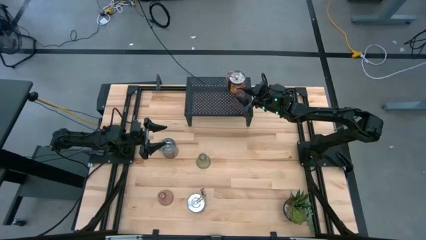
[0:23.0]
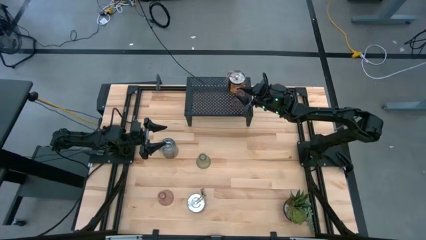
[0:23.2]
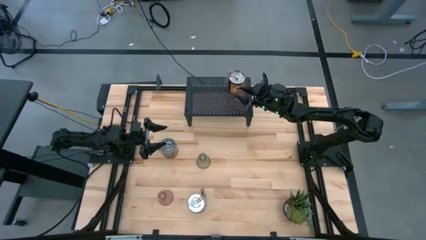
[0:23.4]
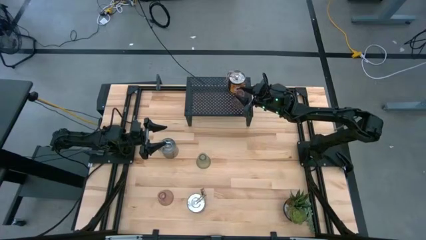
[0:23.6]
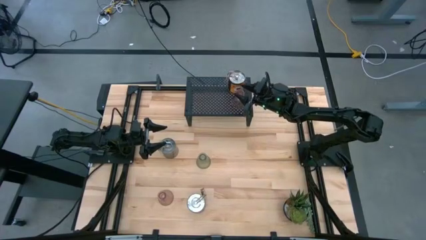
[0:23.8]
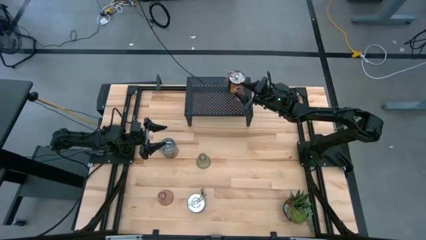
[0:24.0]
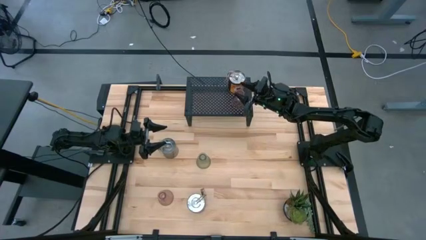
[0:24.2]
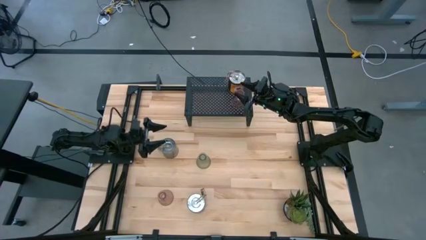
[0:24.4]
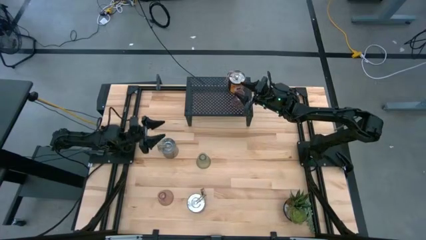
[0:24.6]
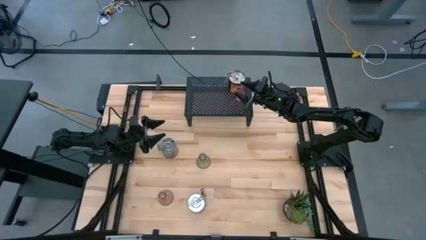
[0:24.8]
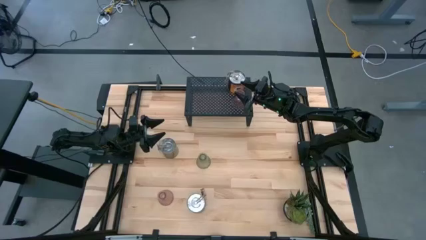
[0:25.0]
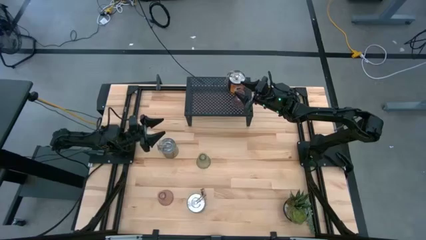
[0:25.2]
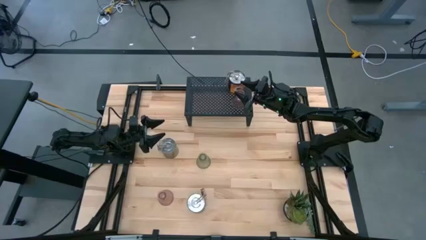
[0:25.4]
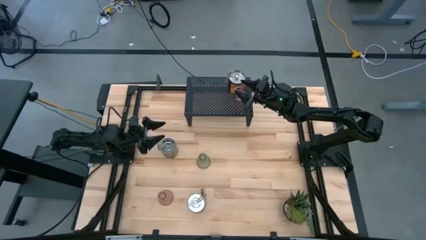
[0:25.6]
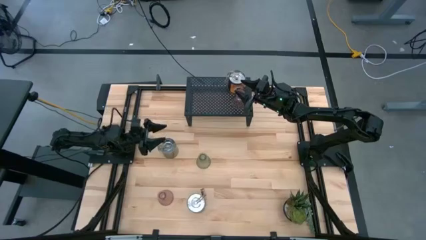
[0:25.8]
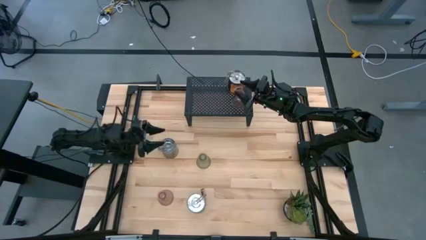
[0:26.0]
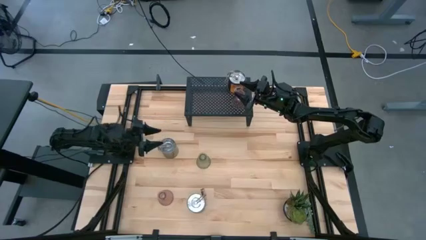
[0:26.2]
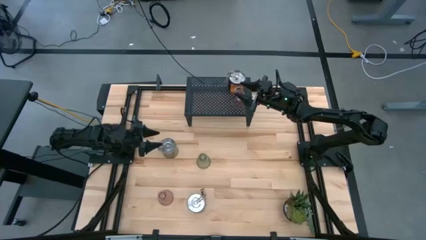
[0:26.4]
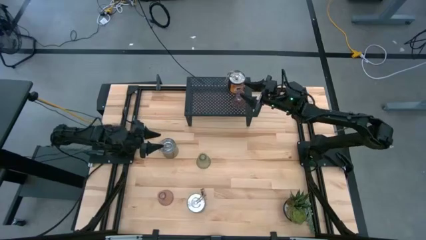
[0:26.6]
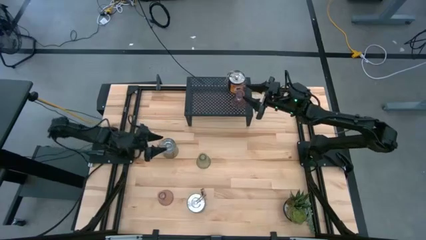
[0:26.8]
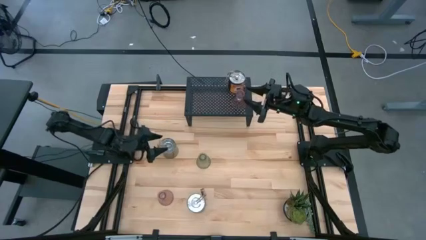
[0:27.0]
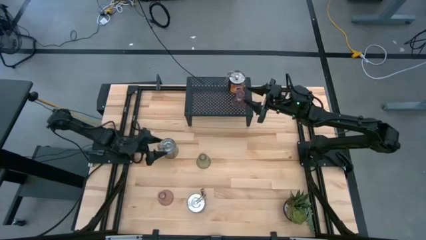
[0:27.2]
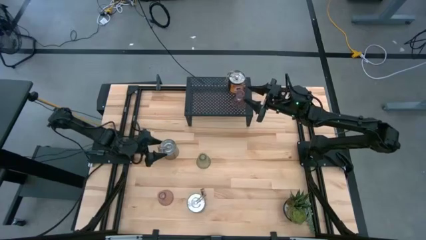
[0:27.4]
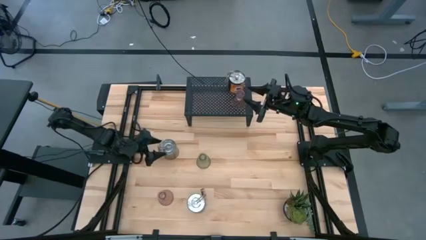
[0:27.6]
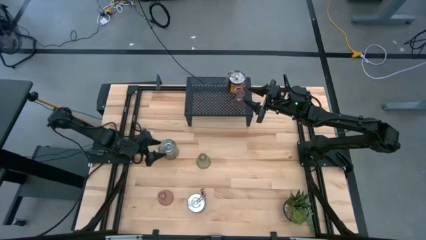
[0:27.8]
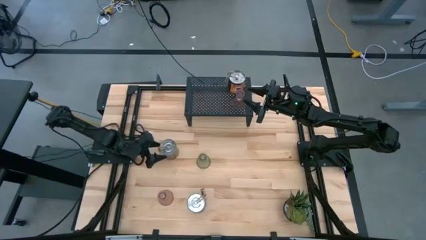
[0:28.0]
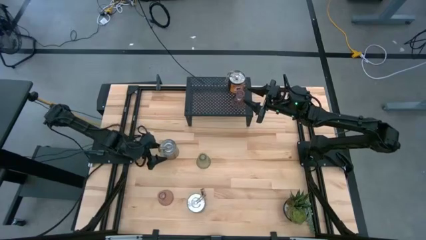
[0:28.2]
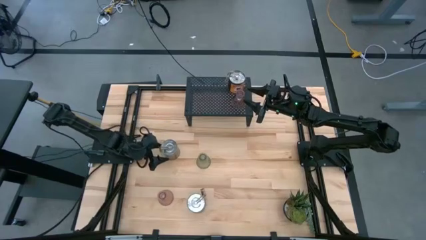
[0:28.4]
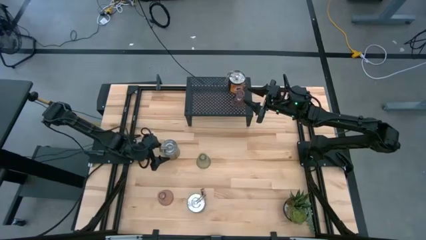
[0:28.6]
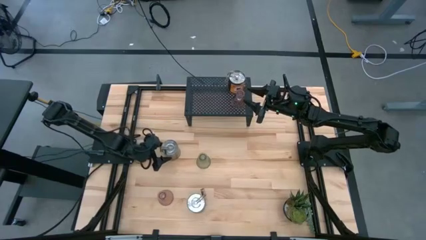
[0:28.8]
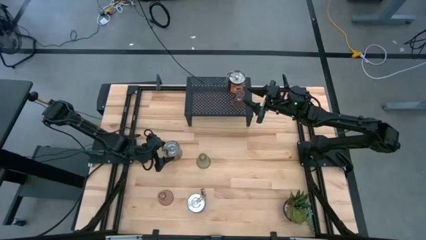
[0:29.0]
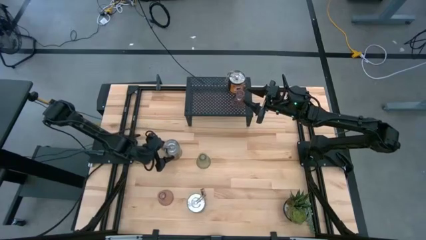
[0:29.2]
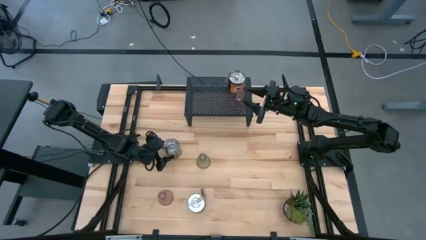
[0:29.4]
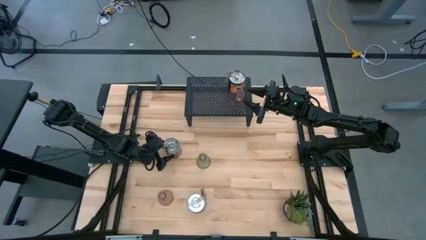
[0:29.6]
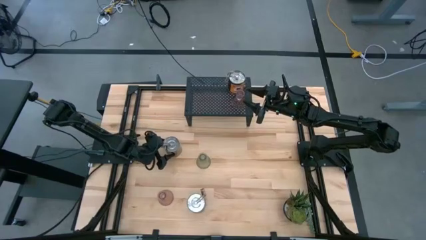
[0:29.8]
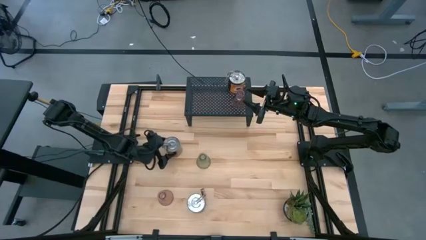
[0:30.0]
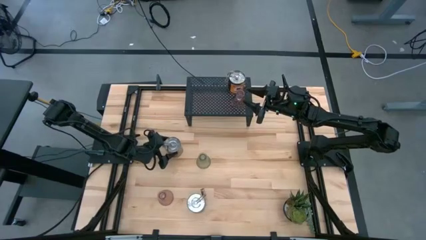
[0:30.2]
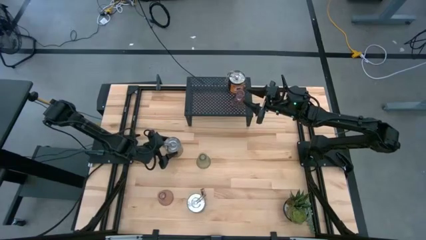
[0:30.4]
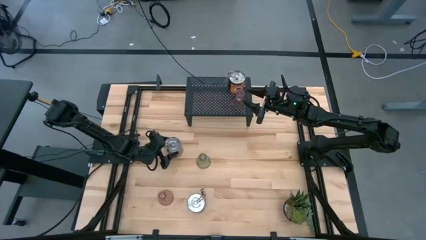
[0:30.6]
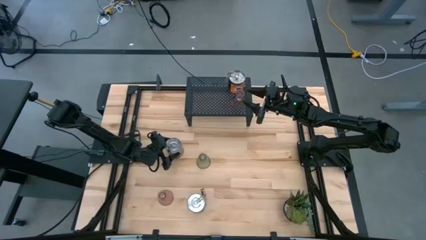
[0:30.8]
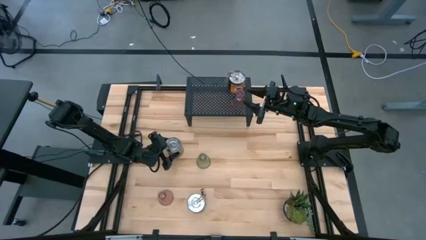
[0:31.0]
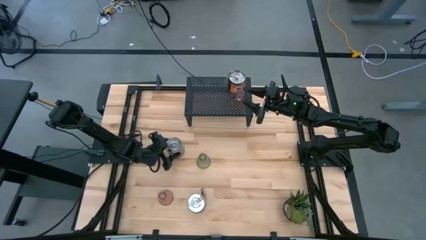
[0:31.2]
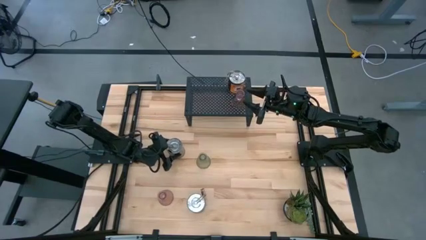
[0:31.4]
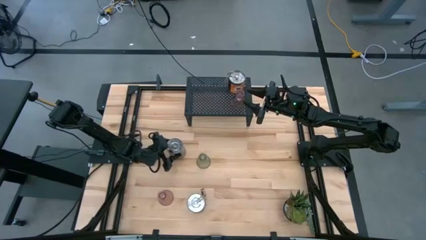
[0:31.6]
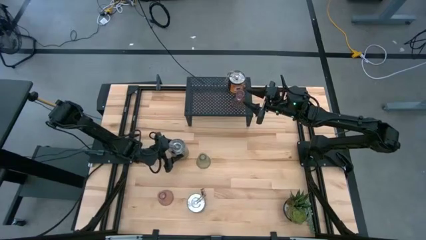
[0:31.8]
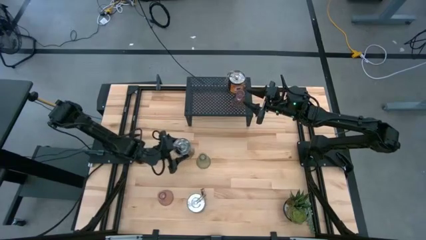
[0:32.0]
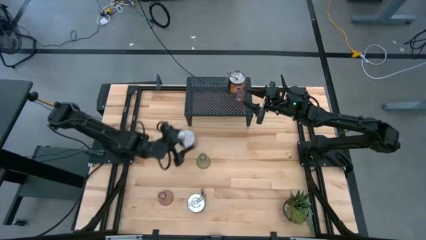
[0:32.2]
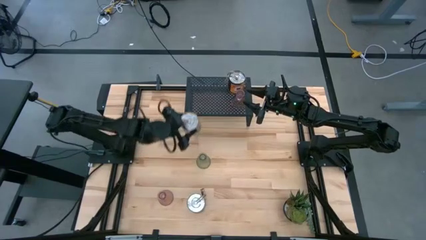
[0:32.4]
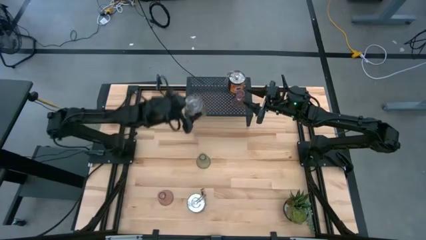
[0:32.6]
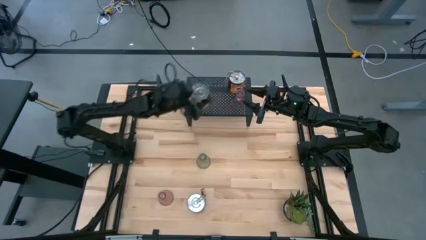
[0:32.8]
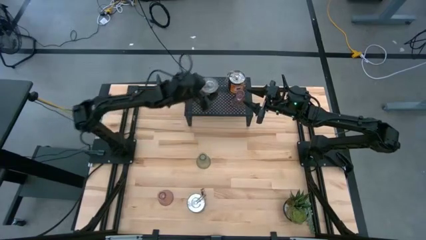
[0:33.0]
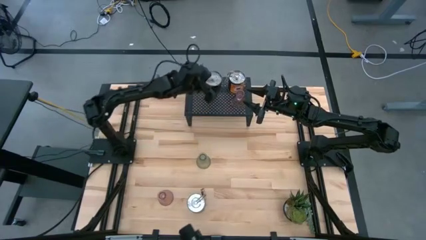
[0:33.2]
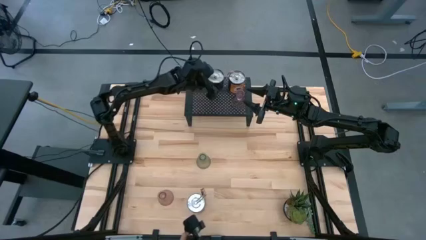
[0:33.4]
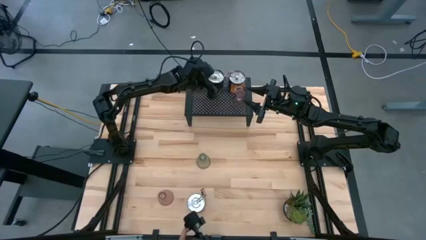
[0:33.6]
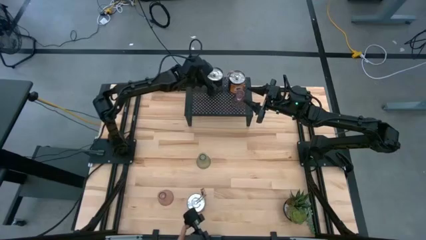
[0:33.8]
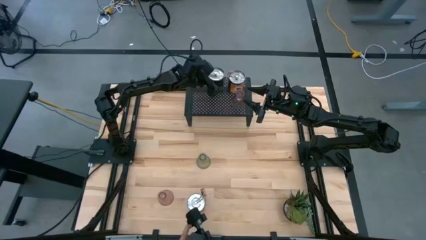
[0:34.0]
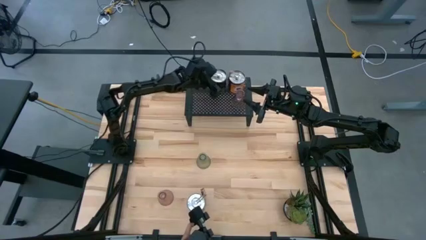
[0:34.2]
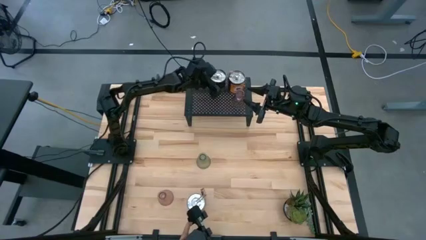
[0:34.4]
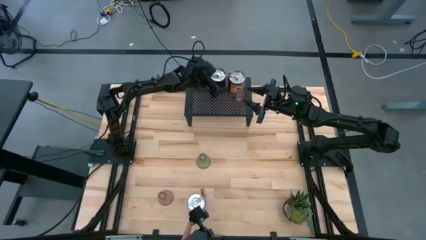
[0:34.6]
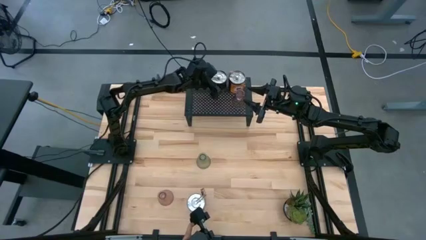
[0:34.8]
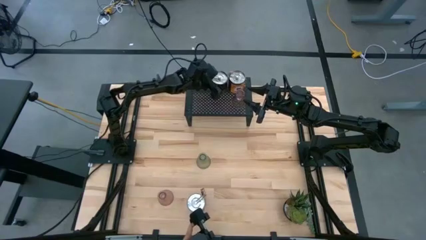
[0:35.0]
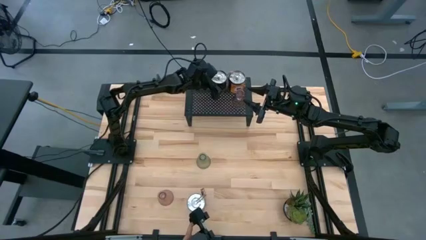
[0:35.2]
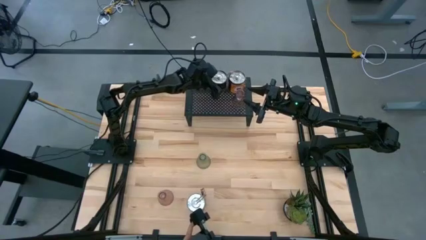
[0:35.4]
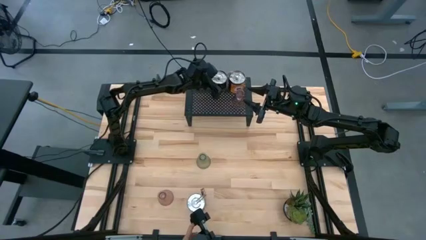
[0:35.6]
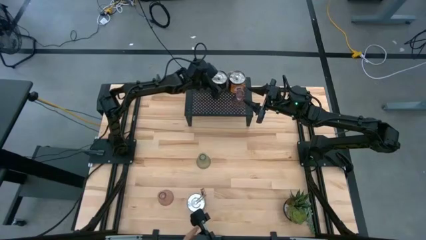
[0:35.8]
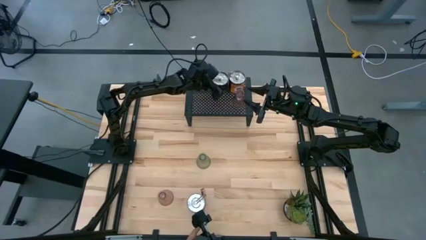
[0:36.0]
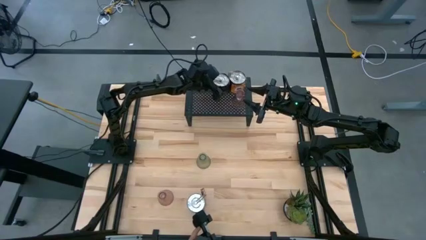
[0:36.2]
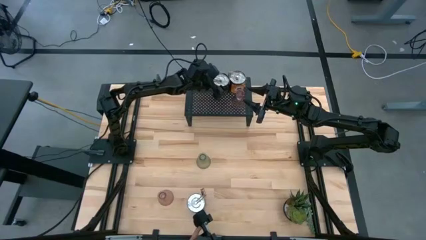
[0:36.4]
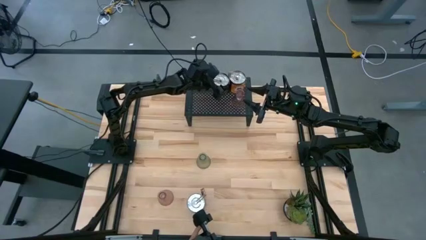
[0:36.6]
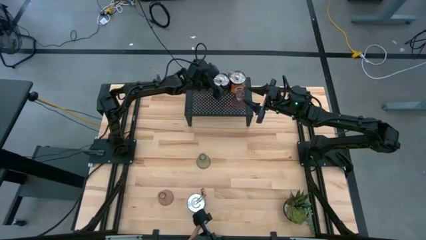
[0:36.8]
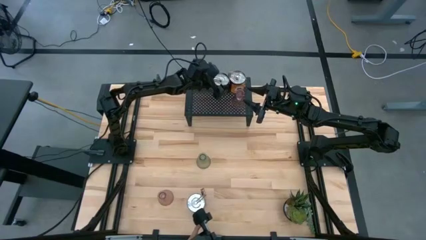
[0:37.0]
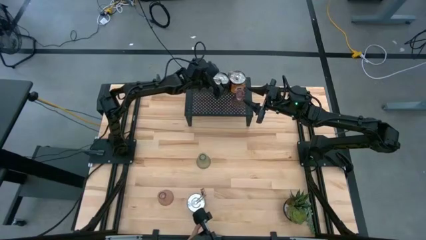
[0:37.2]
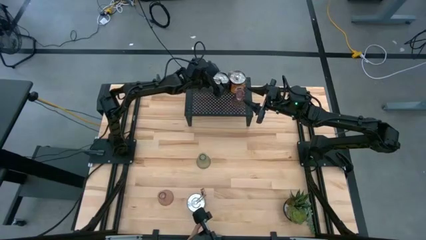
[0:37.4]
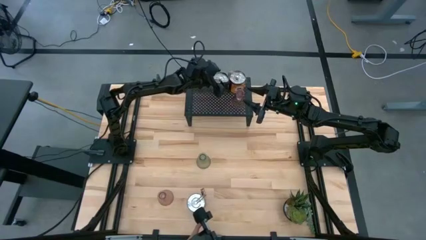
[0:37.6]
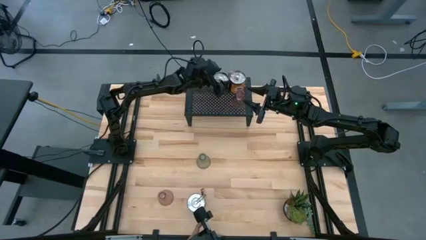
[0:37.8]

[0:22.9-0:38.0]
Task: Pick & Place candle stick holders
Put the top silver scented candle on the shelf aligned with the other scented candles
